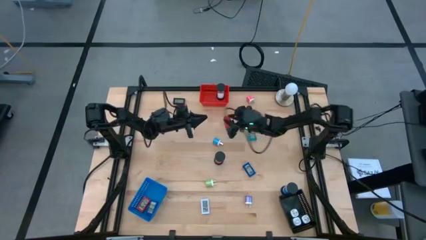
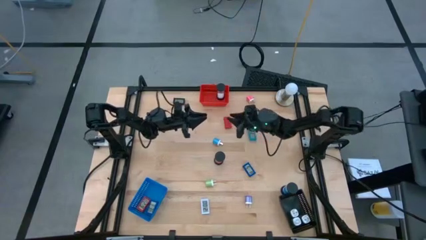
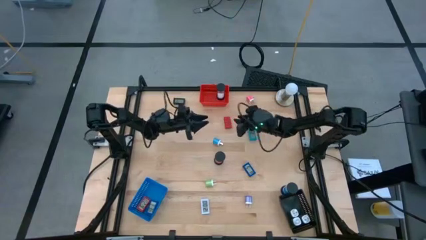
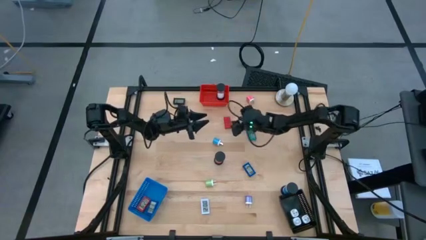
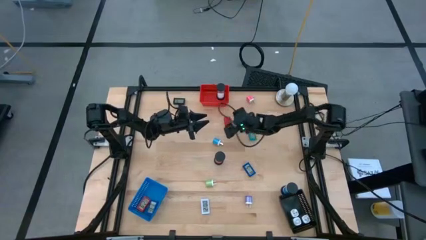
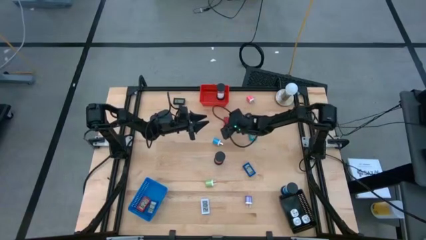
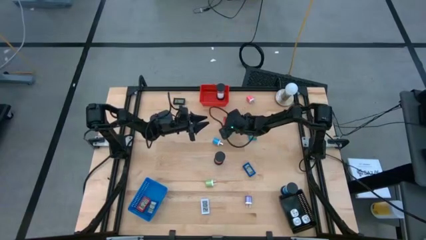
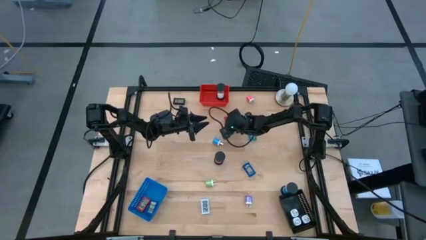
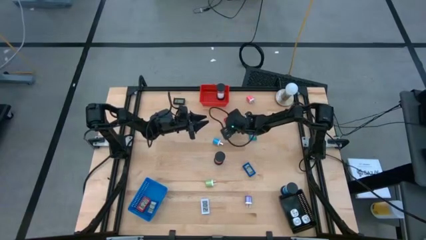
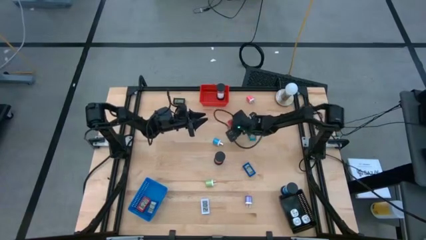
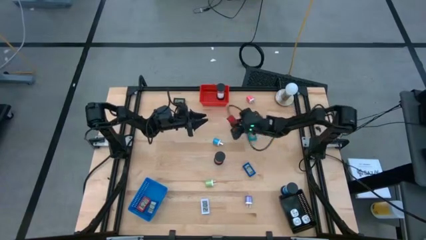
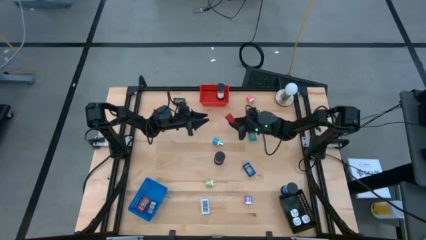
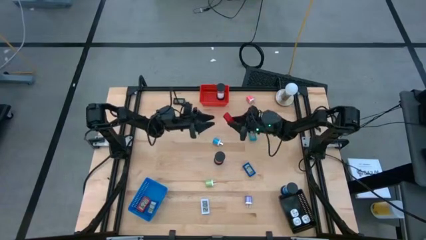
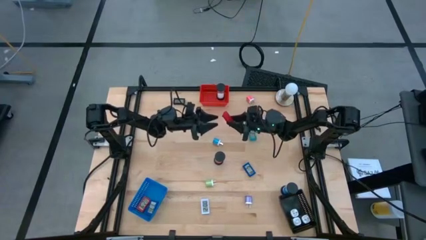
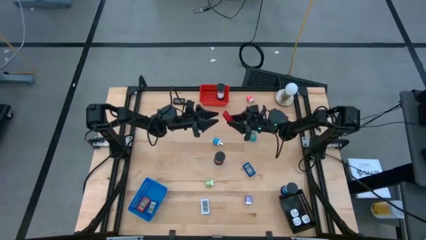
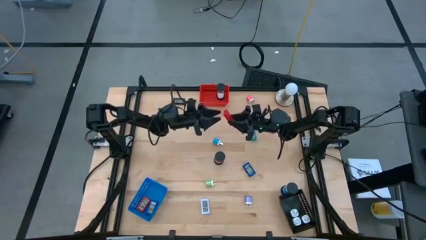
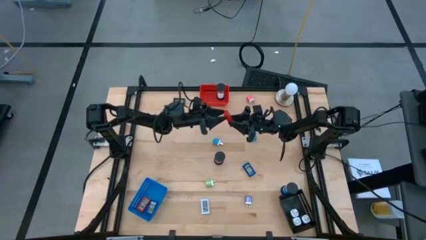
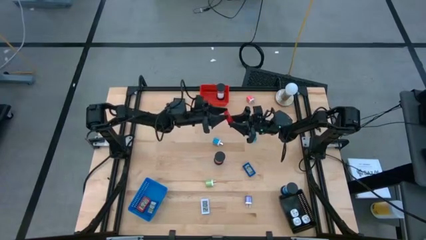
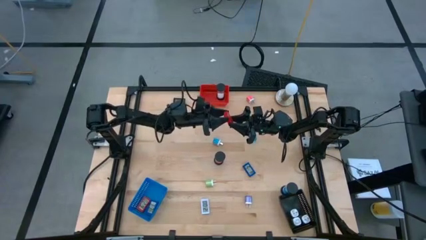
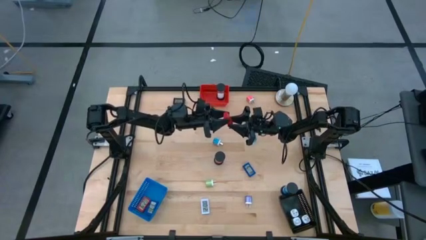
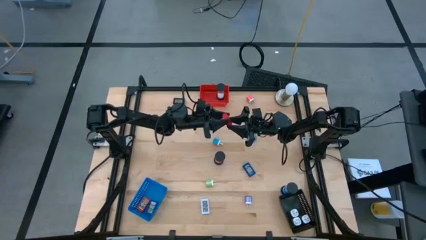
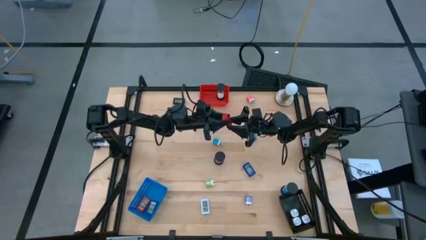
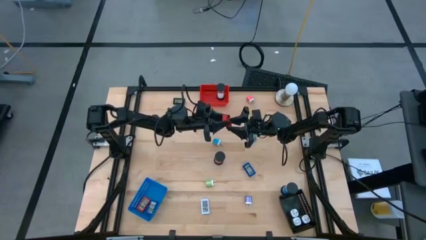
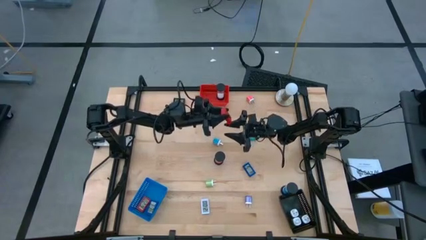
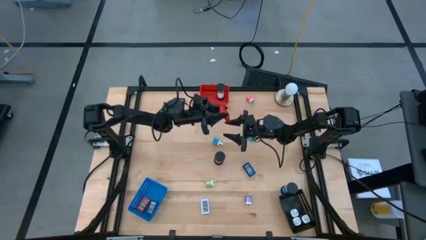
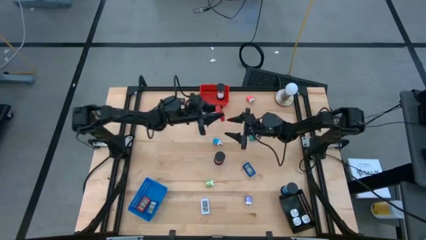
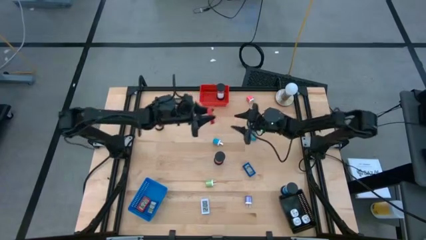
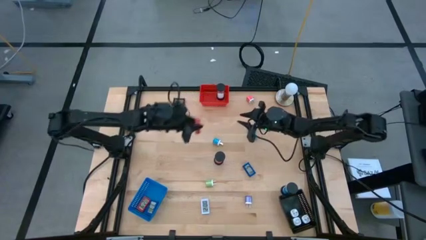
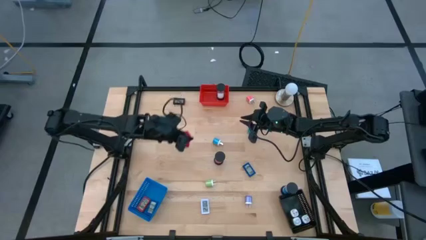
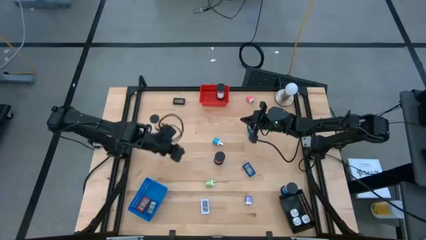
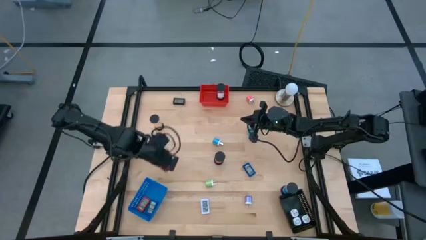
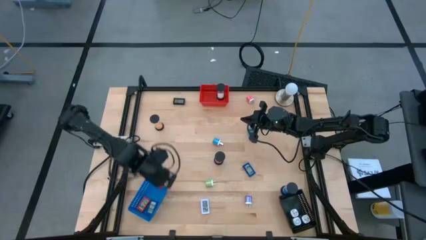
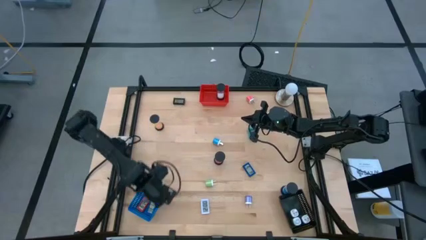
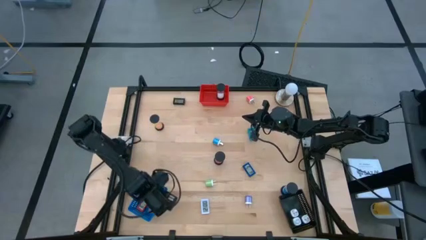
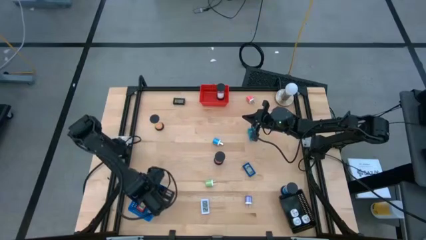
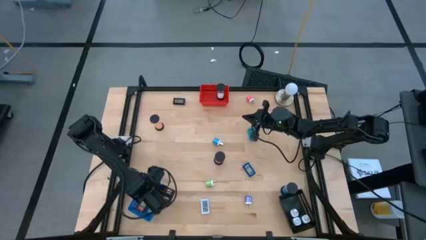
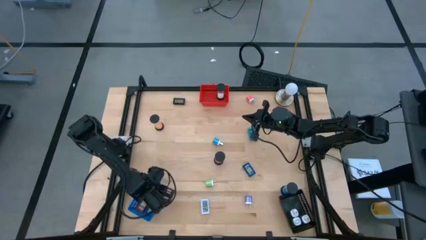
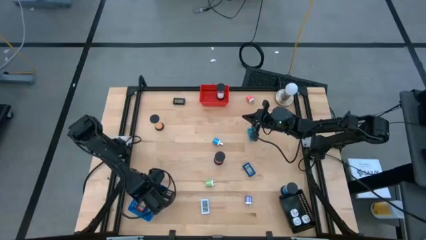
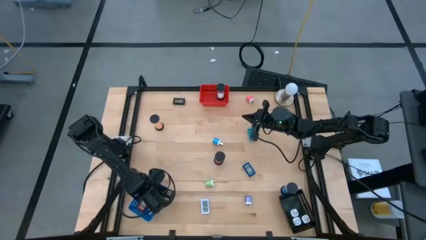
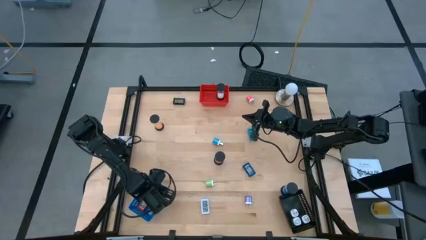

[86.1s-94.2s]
Task: Pick & Place Office items
Put the red digital timer into the blue bin

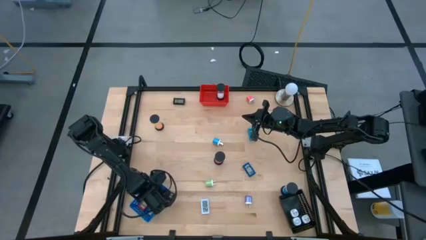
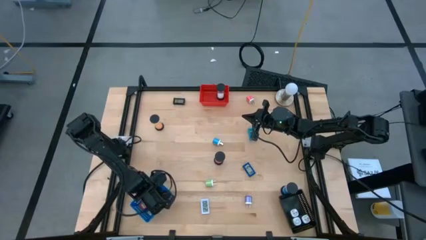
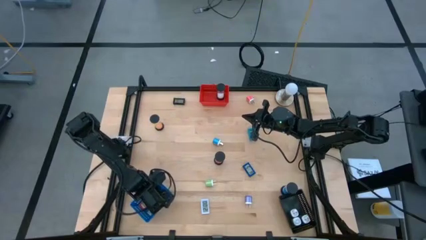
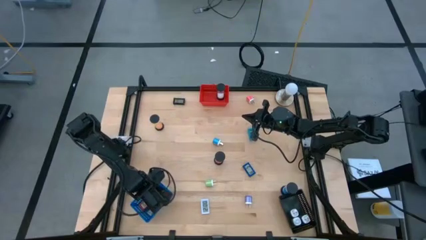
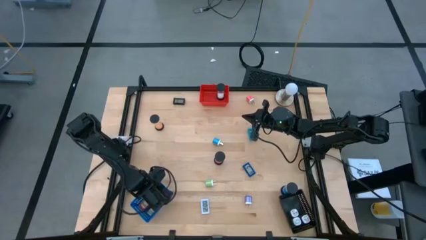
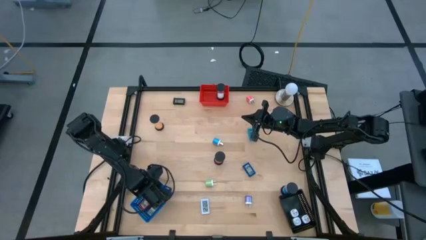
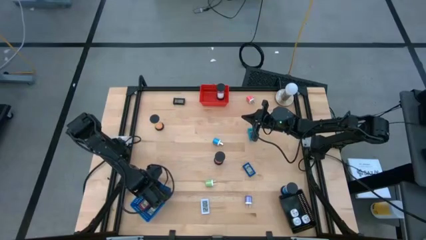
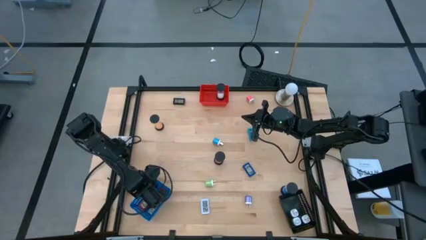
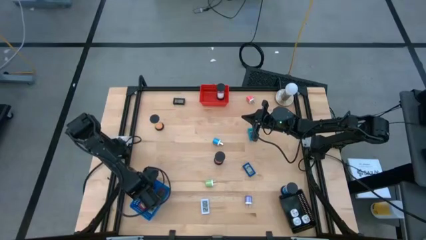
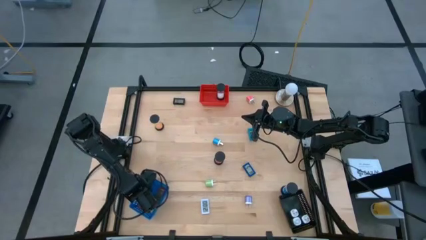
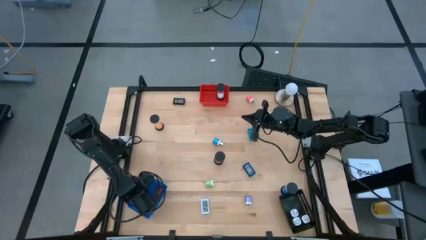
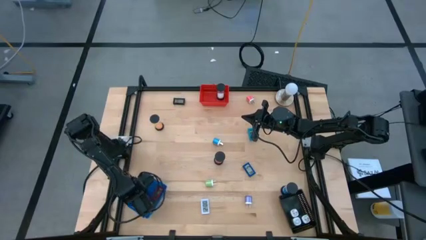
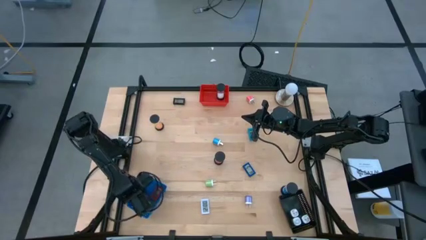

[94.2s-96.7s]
Adjust the blue bin

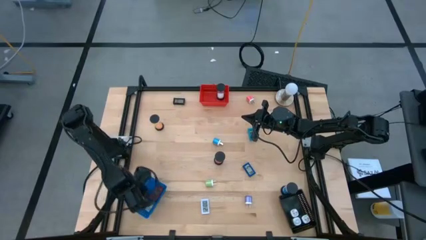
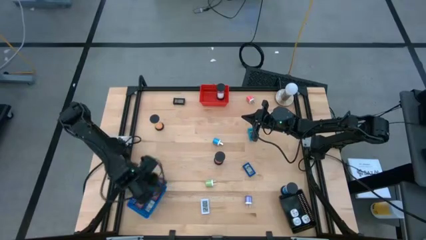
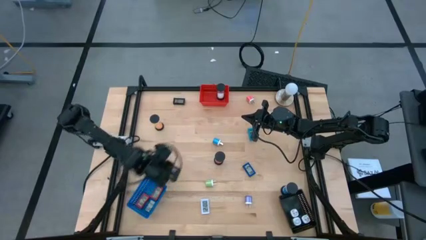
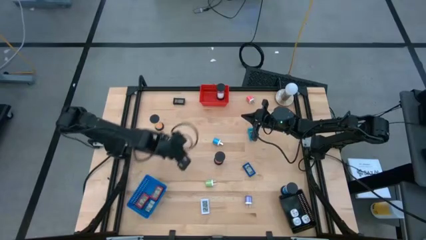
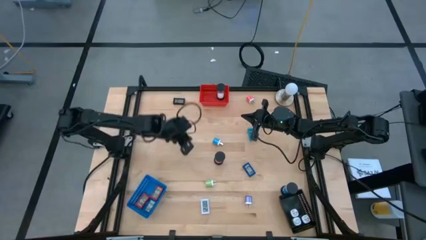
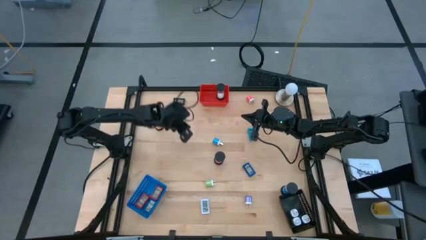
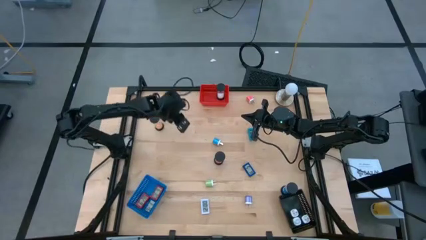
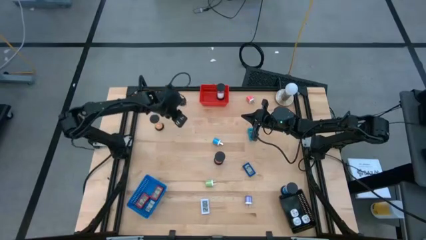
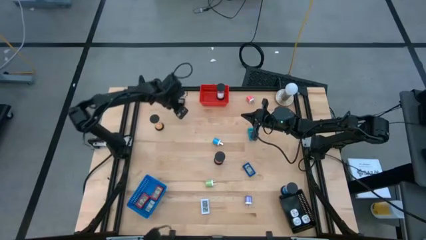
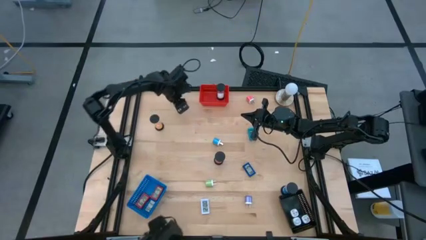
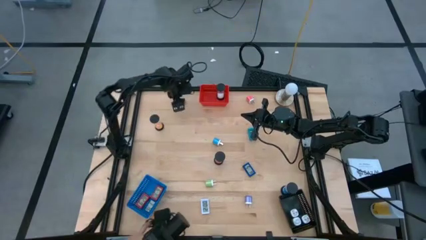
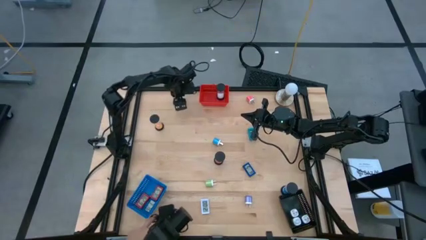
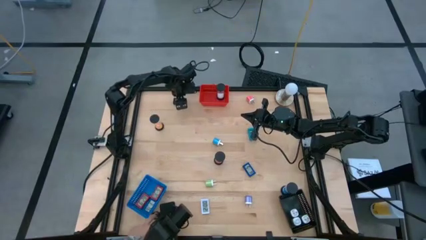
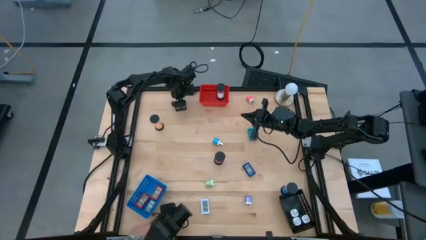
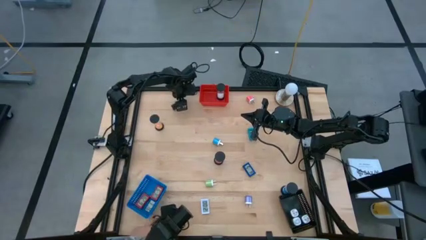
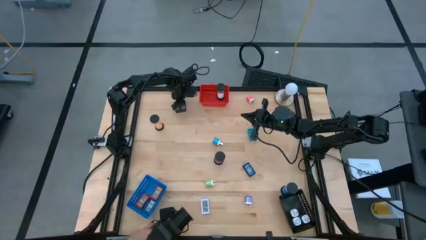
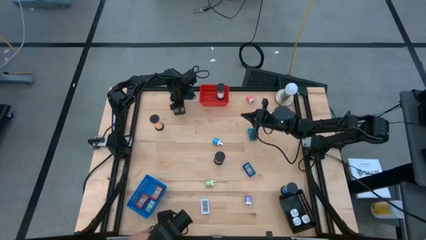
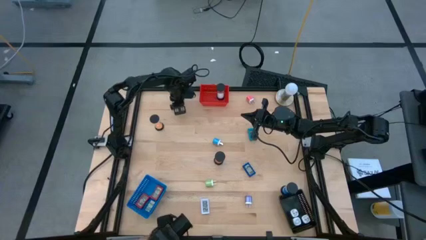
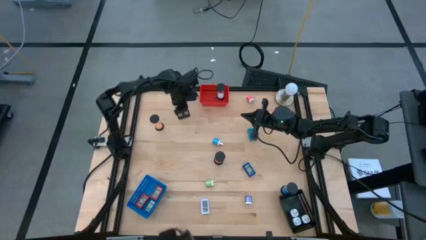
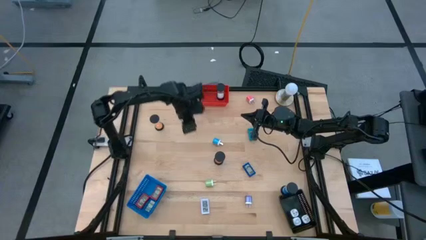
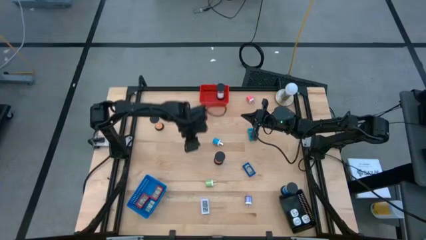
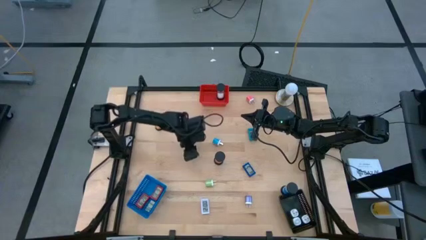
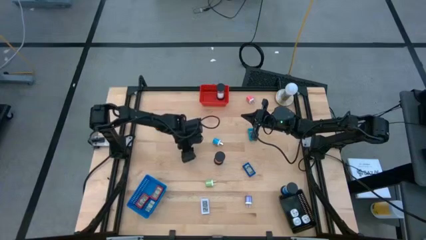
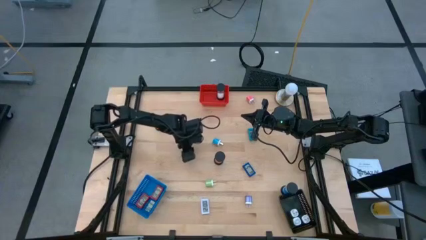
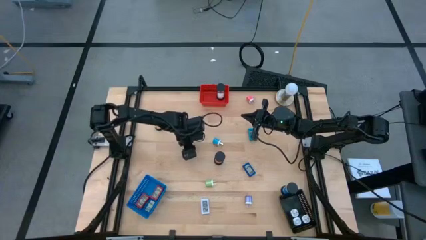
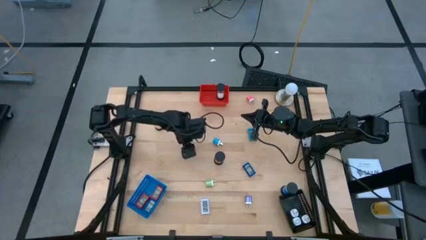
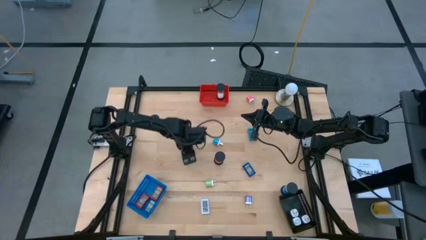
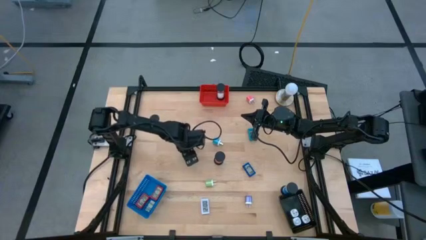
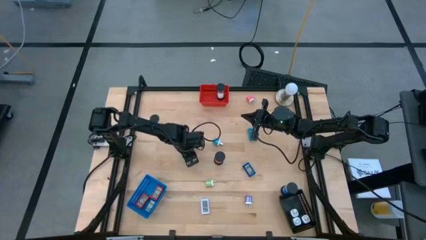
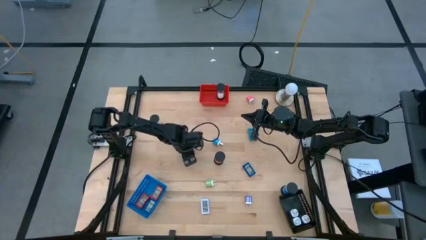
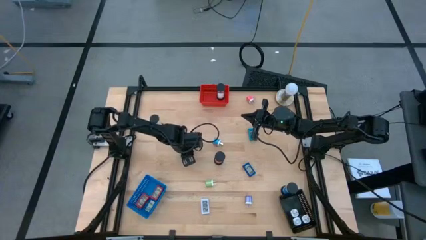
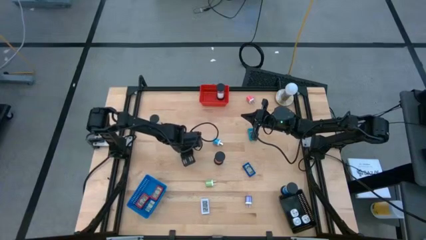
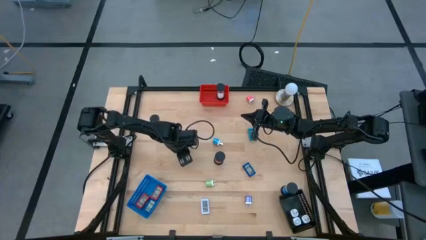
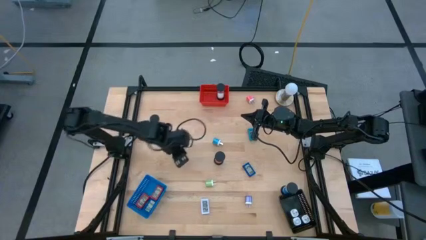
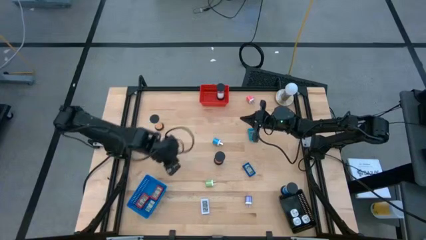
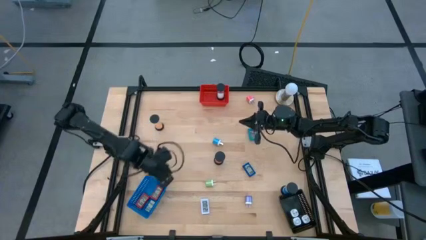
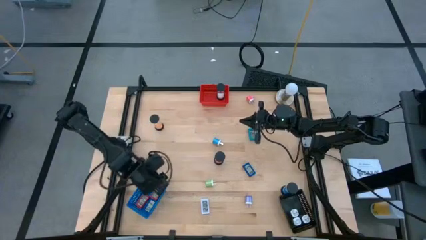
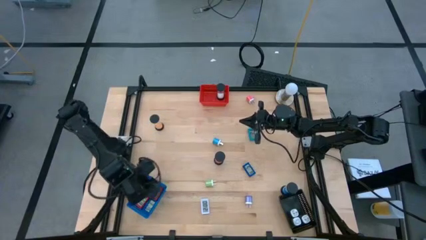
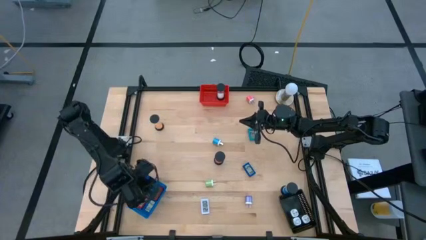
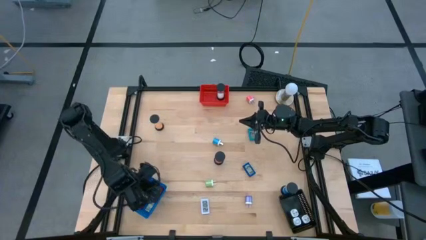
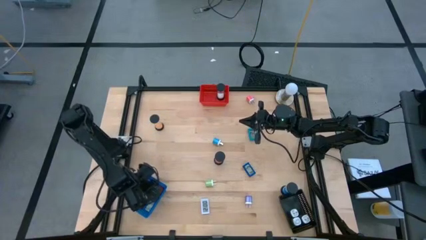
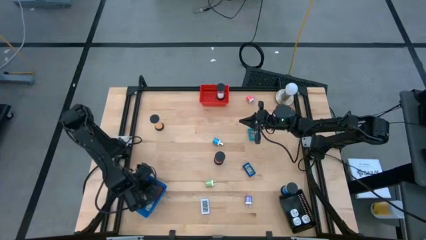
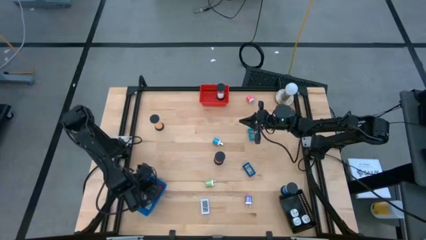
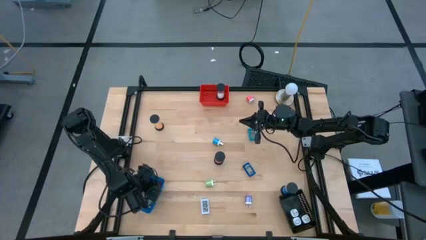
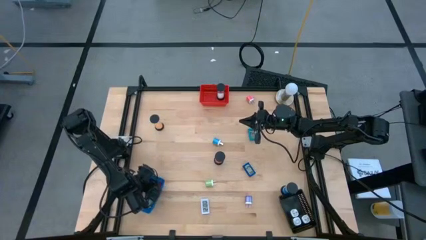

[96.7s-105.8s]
Put the black digital timer into the blue bin
